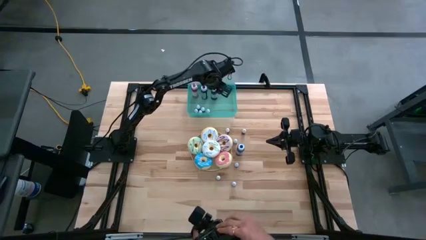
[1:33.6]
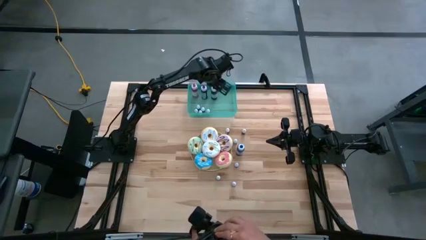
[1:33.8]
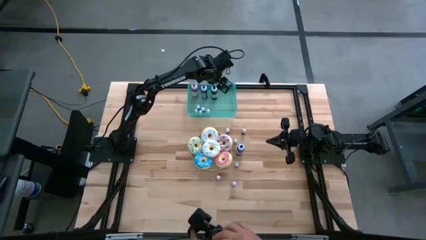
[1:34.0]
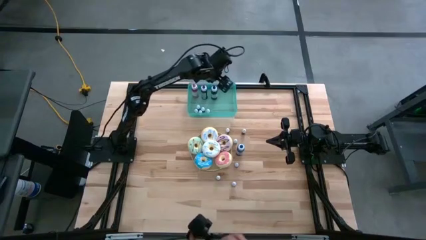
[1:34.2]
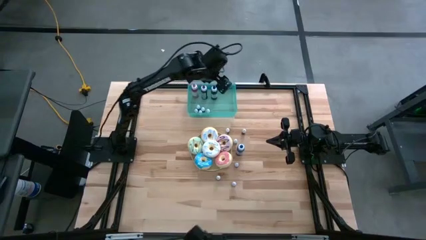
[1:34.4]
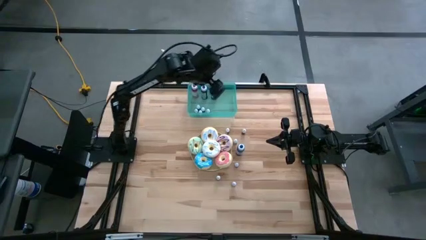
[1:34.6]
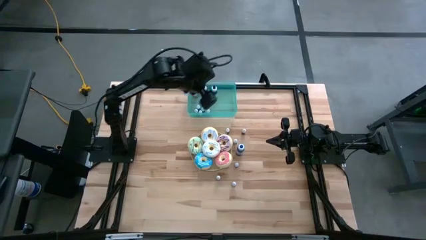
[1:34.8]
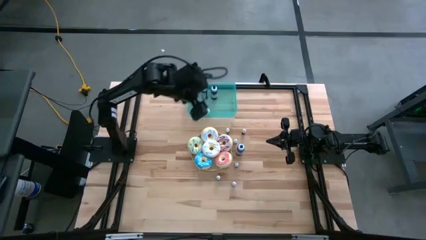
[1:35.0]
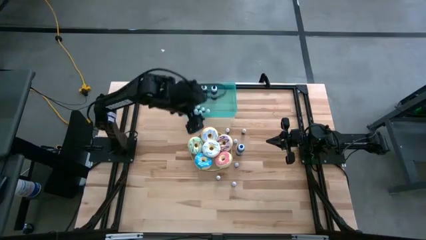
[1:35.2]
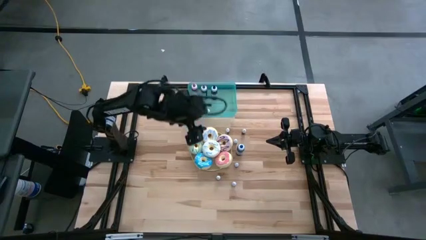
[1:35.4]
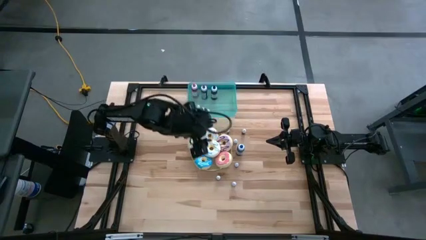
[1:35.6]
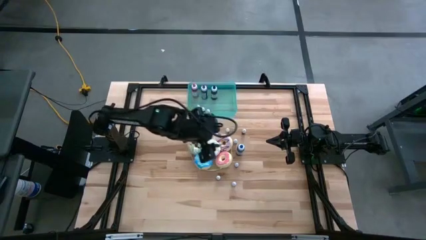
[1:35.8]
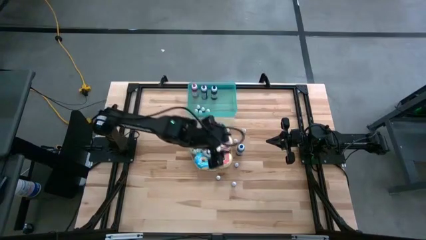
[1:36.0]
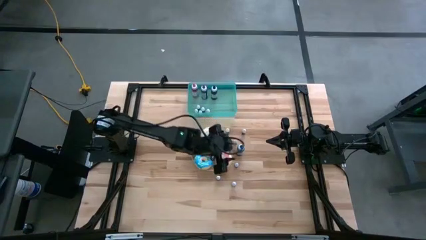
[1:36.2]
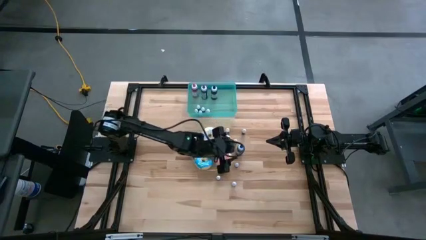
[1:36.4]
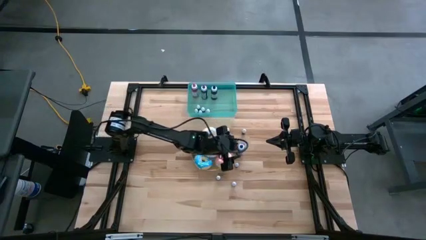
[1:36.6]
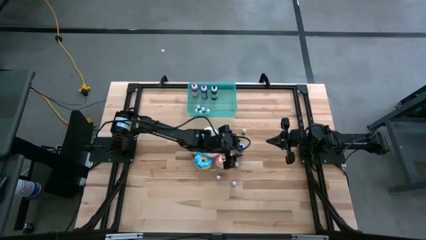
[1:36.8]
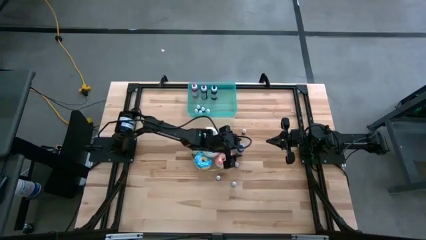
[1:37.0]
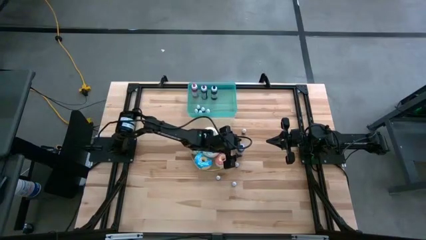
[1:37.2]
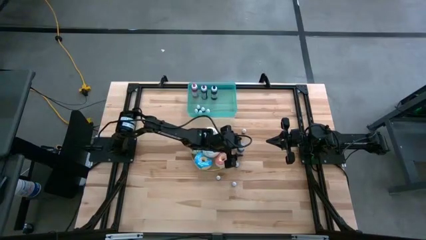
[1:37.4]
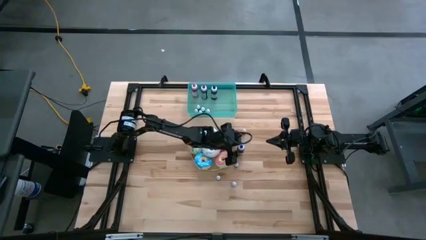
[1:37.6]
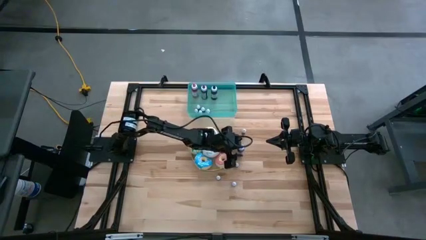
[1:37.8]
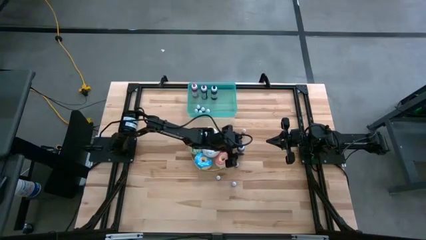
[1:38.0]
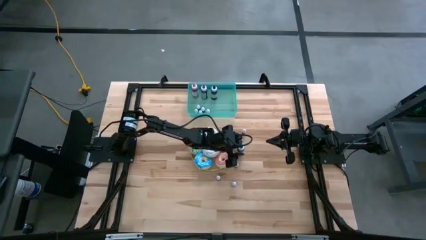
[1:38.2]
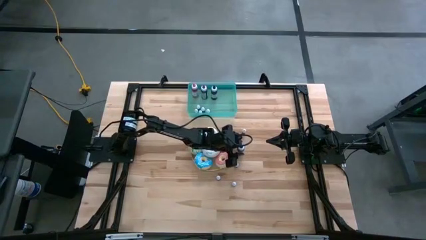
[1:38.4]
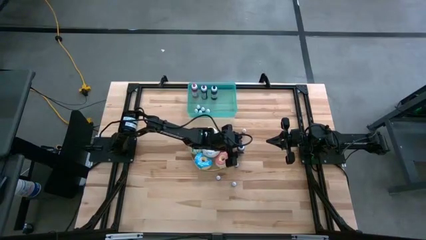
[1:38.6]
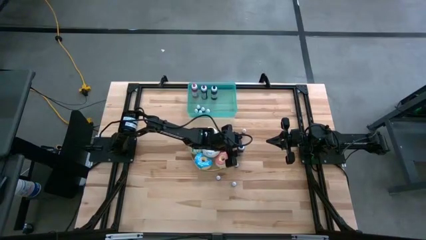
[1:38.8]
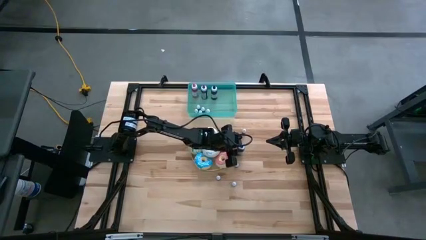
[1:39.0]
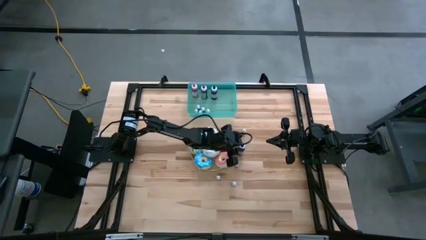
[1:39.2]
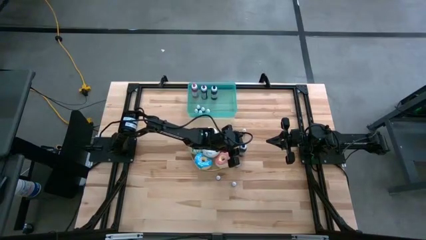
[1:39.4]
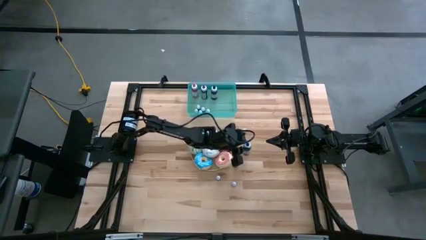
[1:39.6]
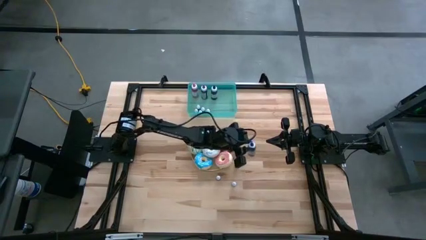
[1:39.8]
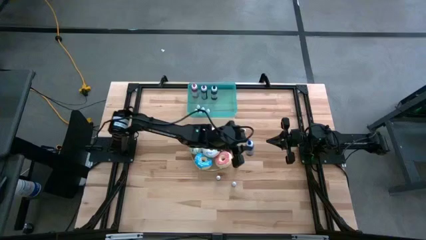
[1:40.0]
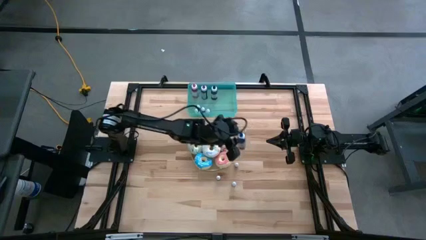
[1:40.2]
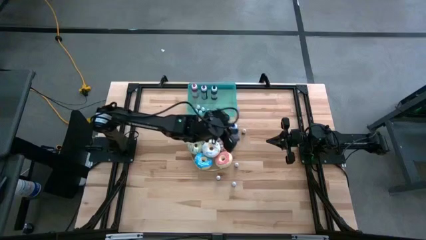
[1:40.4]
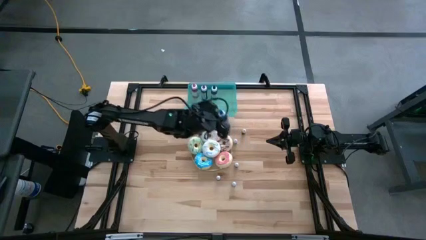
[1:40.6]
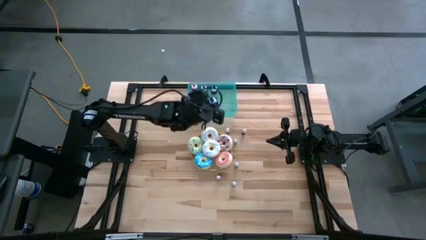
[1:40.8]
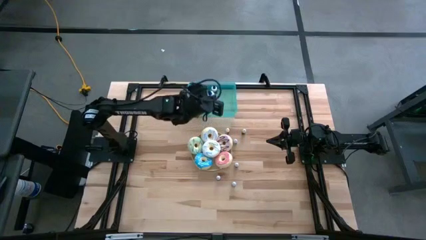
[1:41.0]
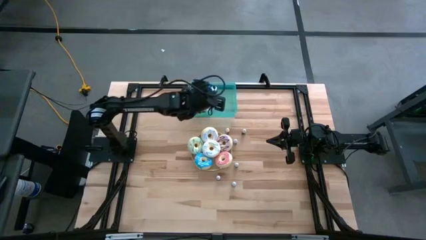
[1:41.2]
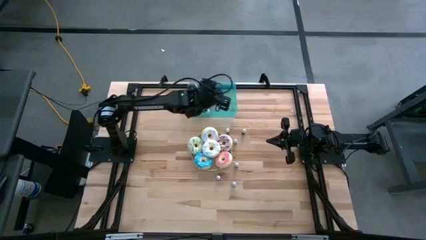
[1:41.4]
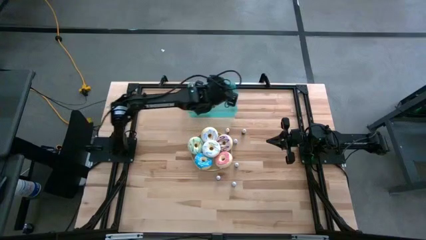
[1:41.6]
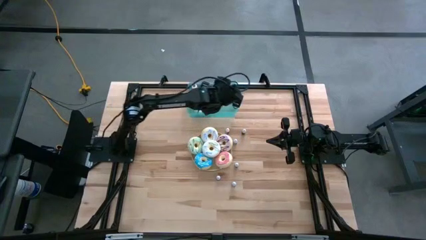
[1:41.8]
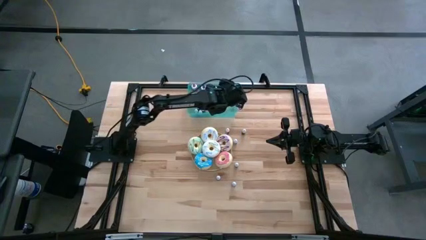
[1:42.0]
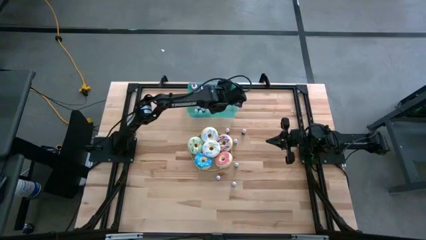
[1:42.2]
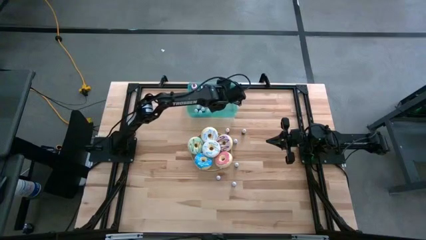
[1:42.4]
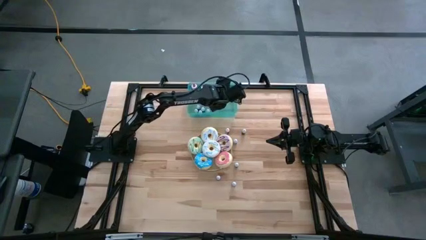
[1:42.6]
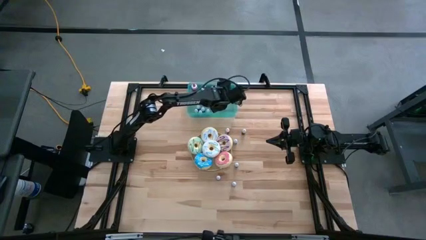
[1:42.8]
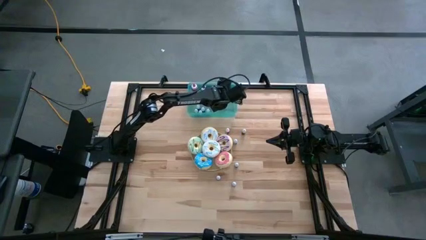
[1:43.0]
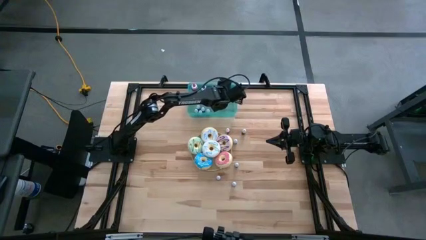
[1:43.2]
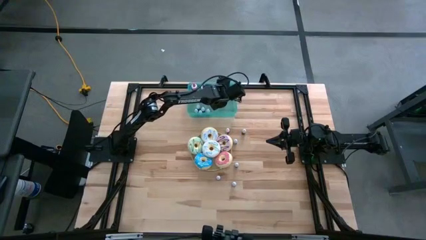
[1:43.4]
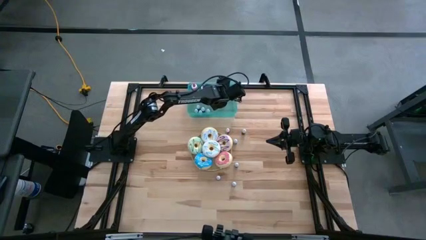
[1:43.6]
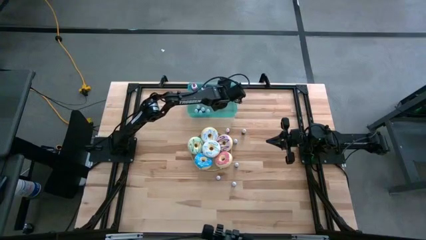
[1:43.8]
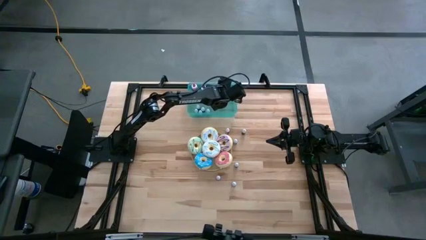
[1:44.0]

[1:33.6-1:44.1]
Task: Pick & Place food coloring
Put the large blue food coloring bottle into the green container

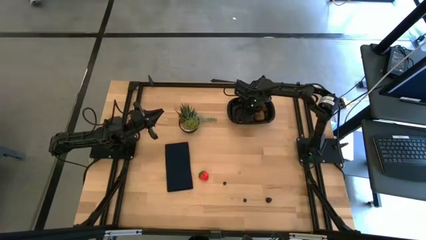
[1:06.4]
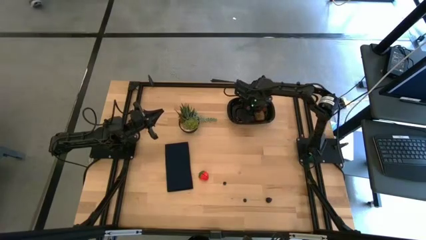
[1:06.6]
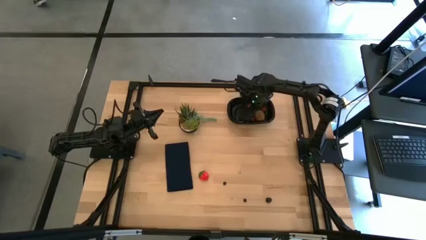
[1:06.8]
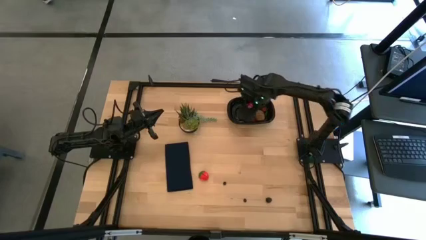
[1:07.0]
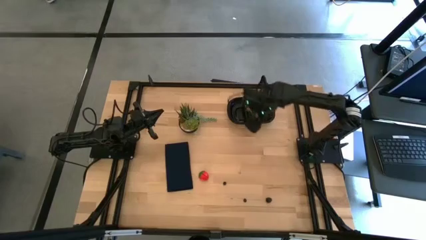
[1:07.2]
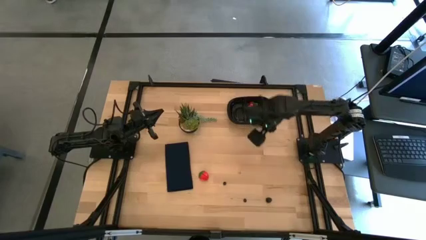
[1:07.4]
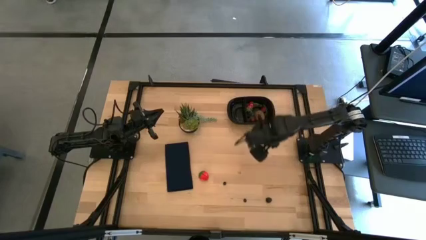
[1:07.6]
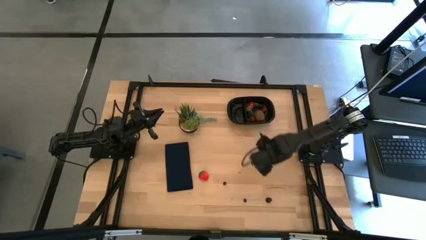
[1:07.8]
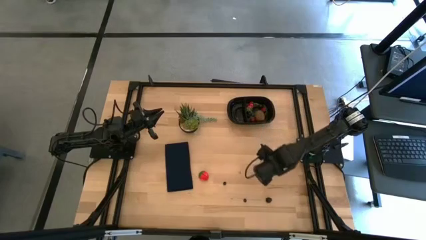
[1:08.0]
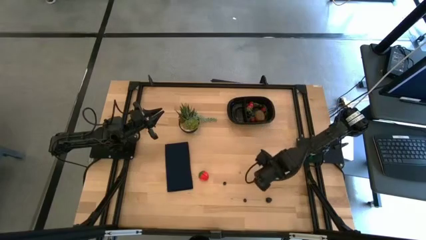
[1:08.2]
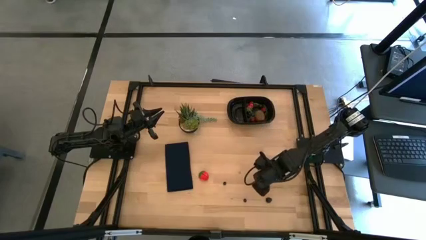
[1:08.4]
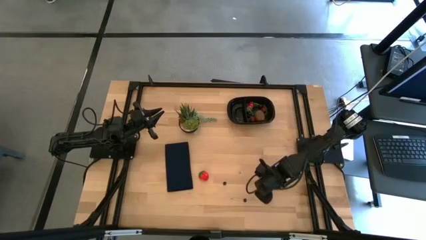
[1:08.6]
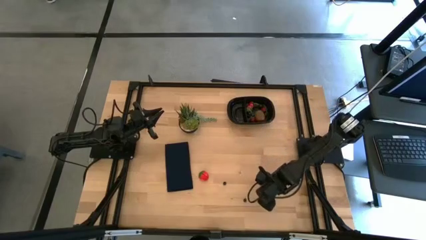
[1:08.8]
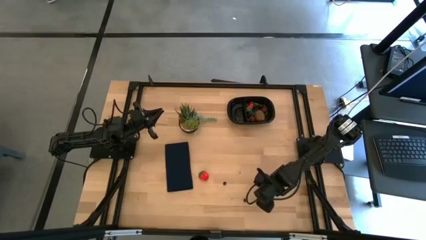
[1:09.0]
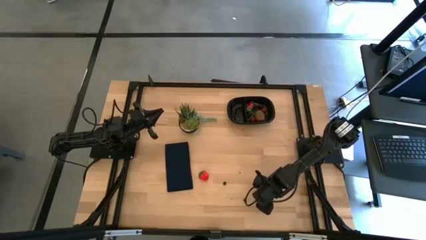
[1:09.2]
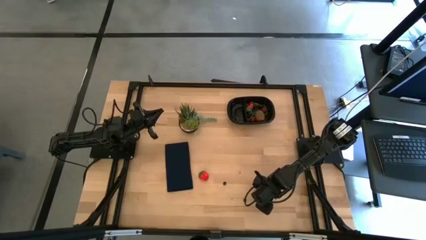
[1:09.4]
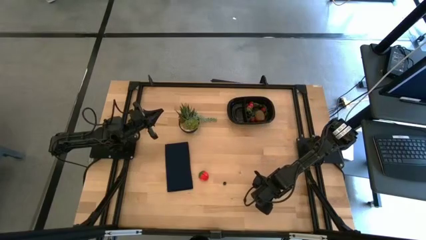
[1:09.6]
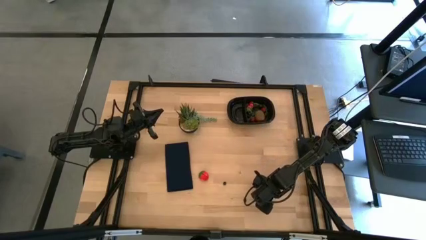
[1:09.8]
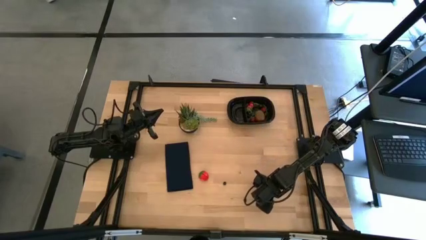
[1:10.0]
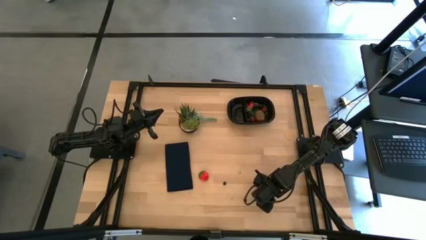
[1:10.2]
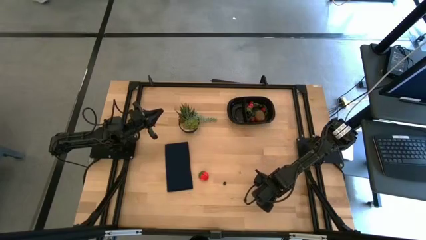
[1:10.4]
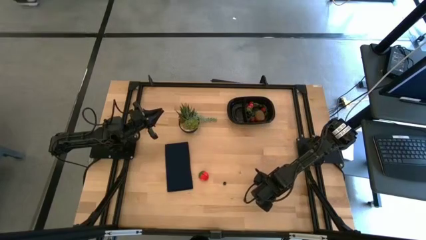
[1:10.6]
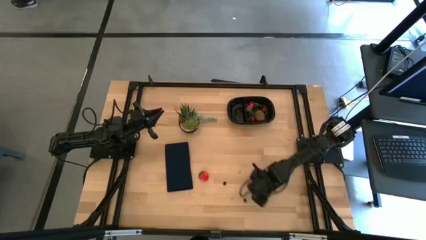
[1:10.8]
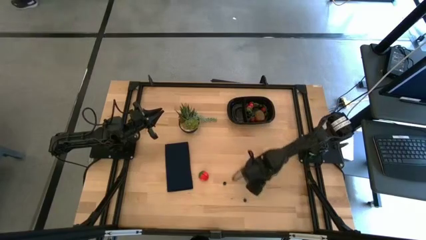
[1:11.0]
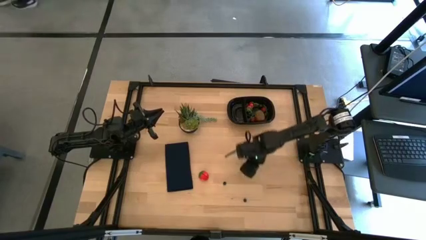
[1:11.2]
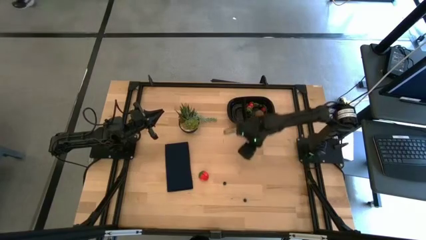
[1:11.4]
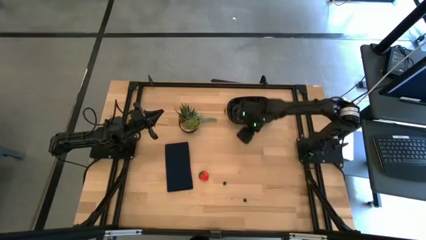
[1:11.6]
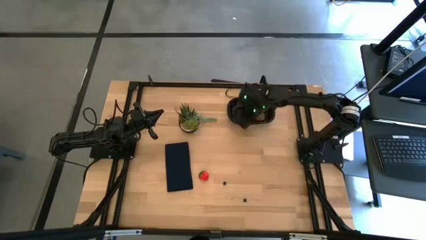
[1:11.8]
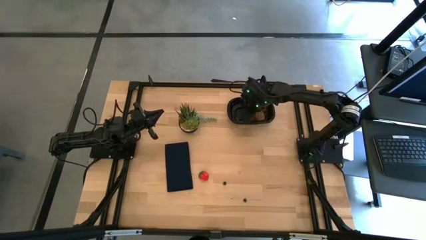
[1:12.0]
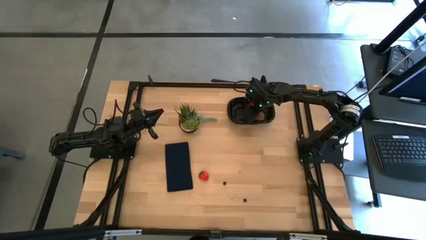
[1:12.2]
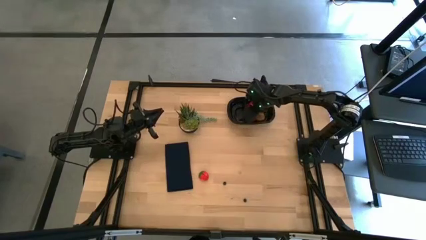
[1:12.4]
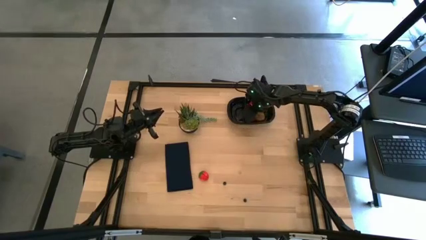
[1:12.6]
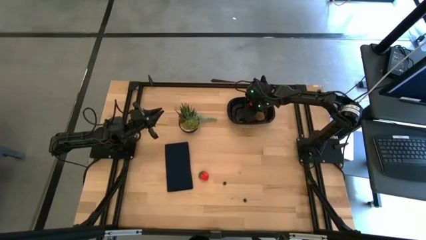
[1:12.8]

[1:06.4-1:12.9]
Task: Pick and placing Produce into tupperware
Put the blackberry into the black container
